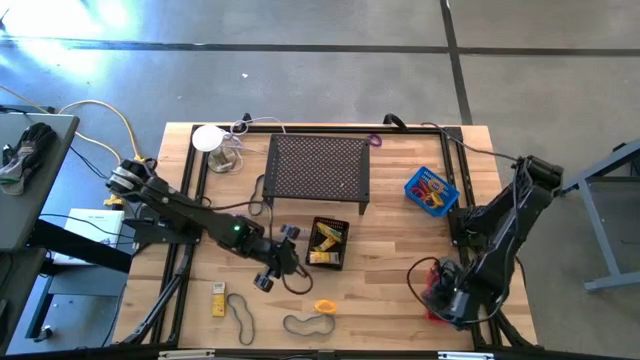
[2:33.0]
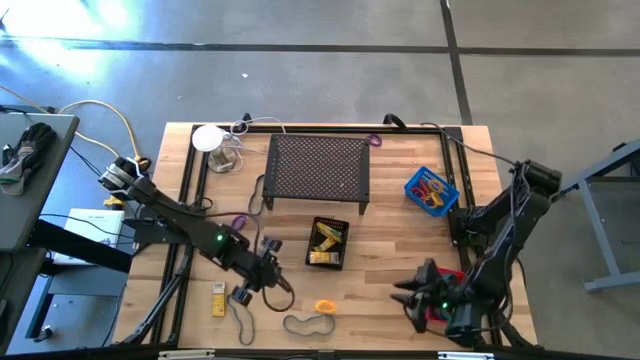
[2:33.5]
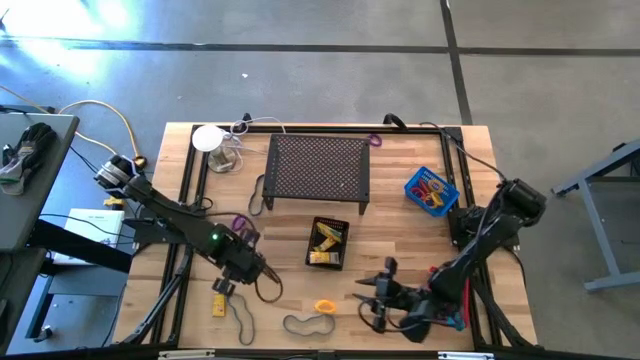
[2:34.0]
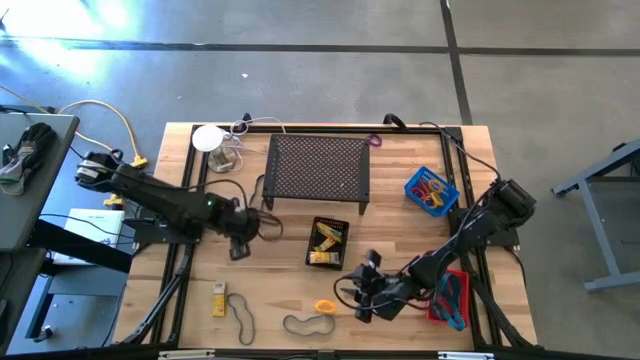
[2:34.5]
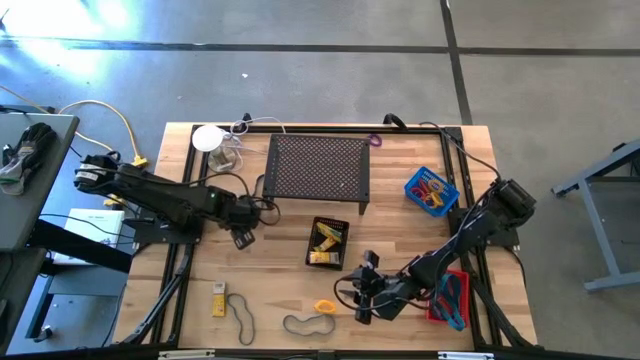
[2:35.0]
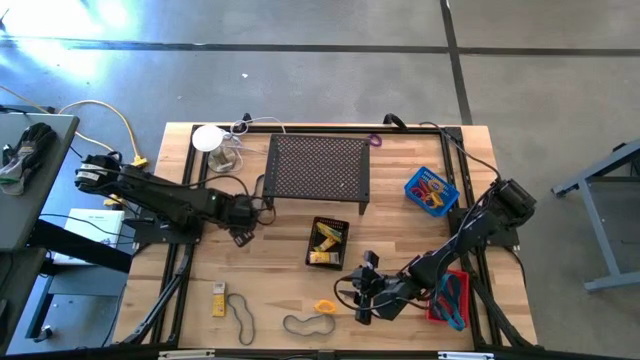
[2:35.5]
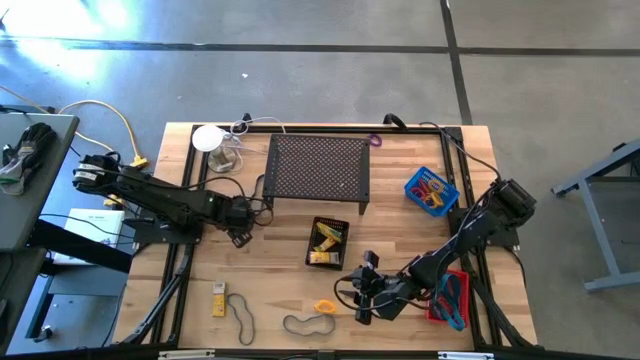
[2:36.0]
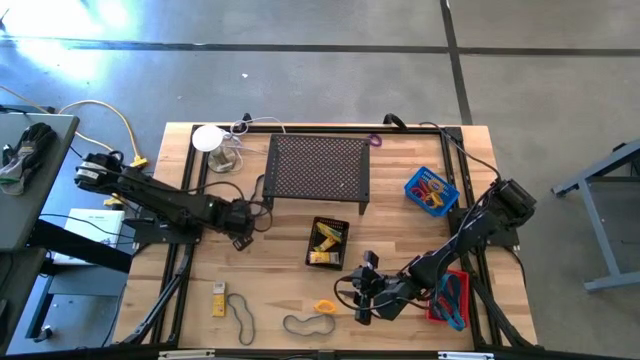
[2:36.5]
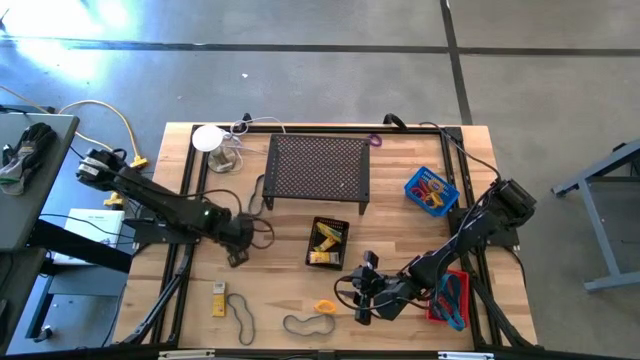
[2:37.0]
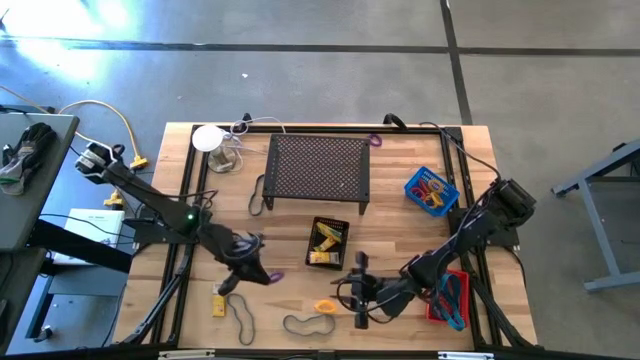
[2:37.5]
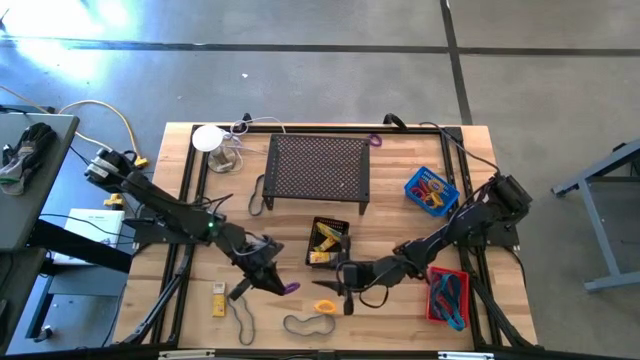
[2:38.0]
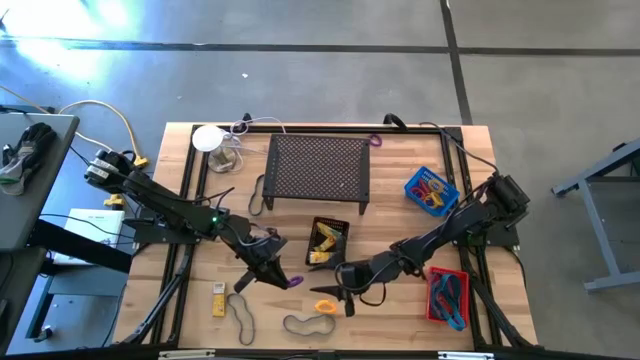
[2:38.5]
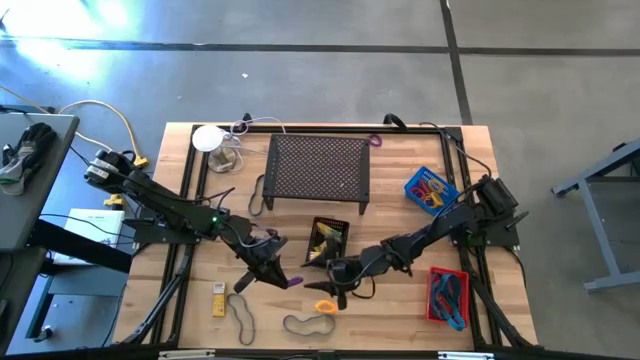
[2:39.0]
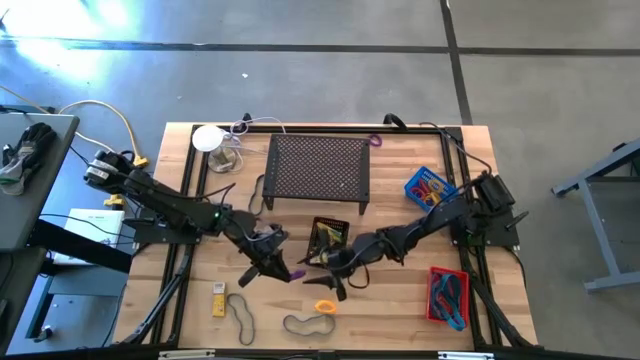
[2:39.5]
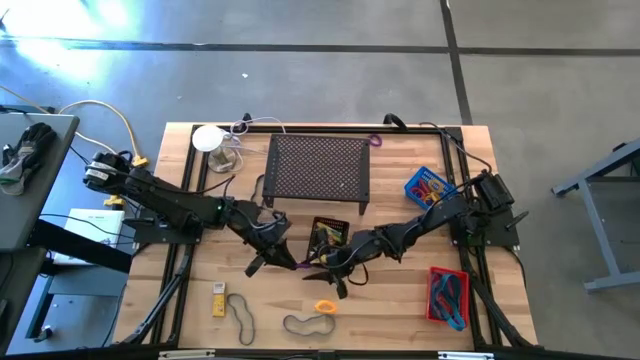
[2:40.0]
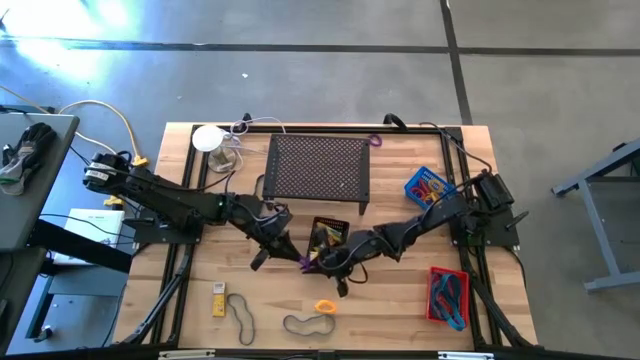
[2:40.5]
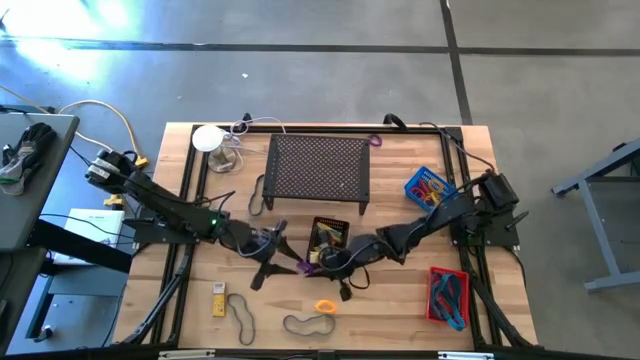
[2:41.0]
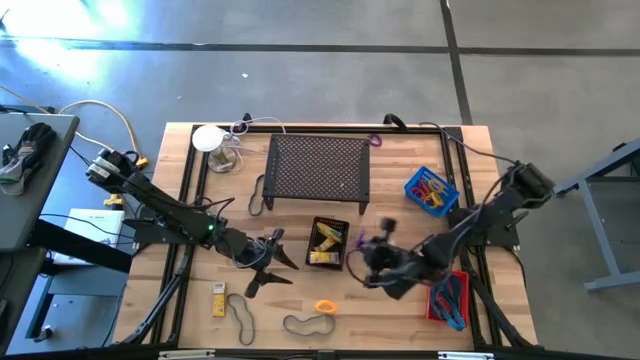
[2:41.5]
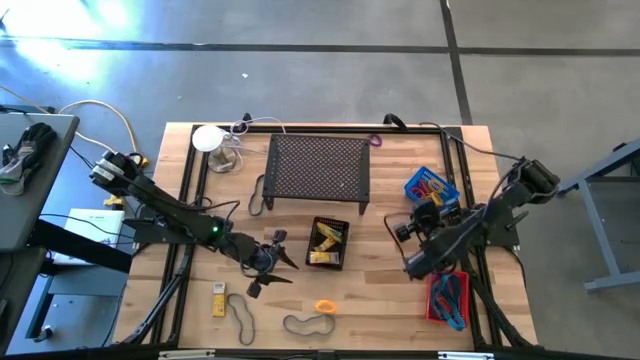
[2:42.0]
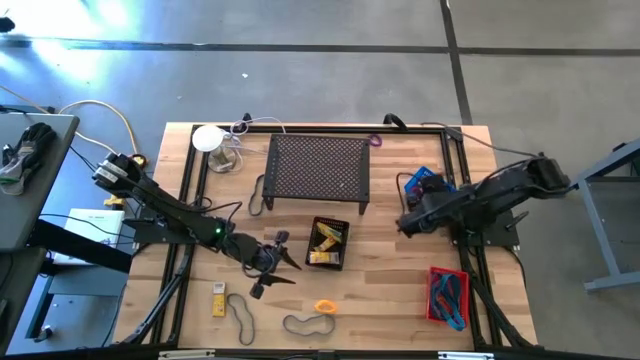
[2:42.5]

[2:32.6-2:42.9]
Task: Pick & Place Office Desk Supplies
Put the purple spring keychain into the blue bin

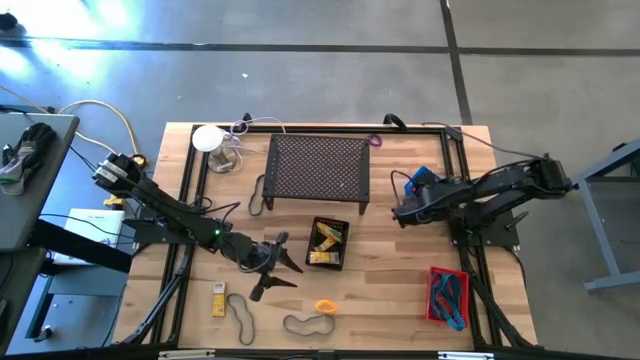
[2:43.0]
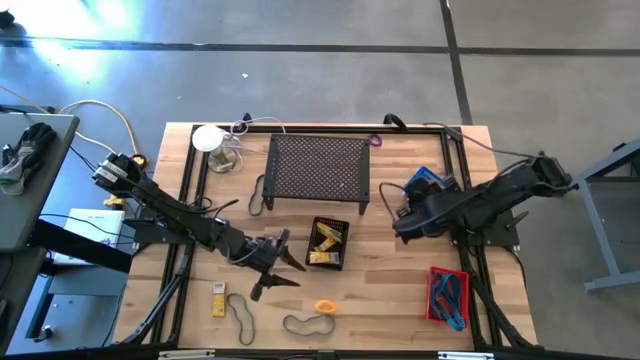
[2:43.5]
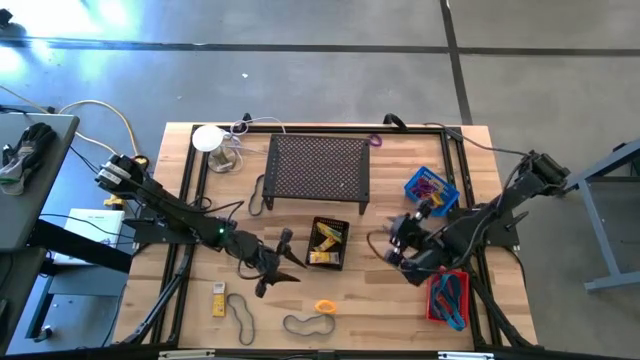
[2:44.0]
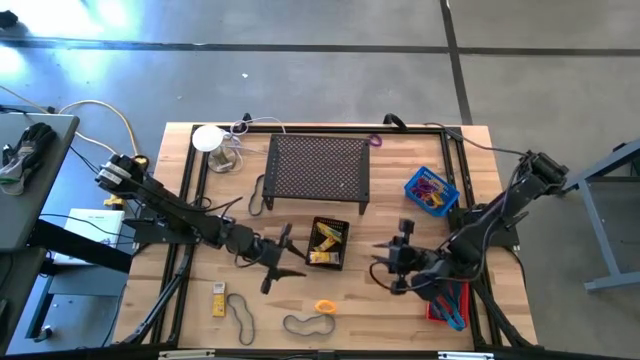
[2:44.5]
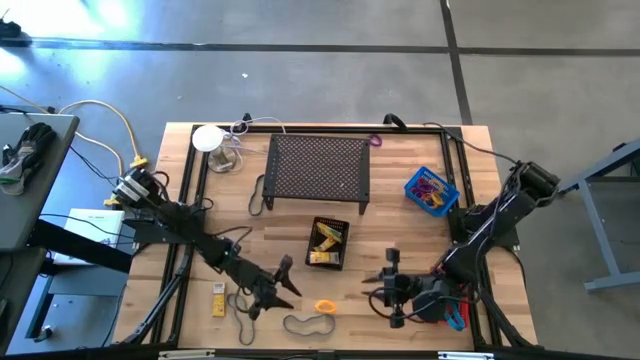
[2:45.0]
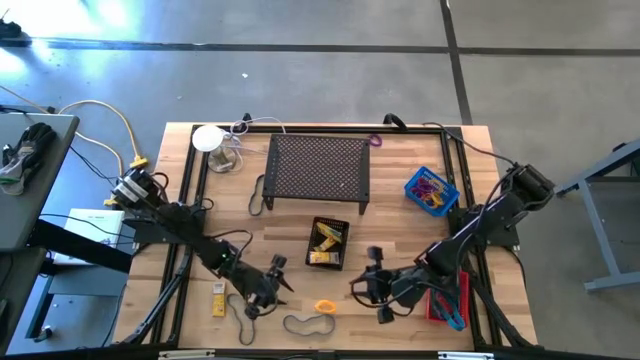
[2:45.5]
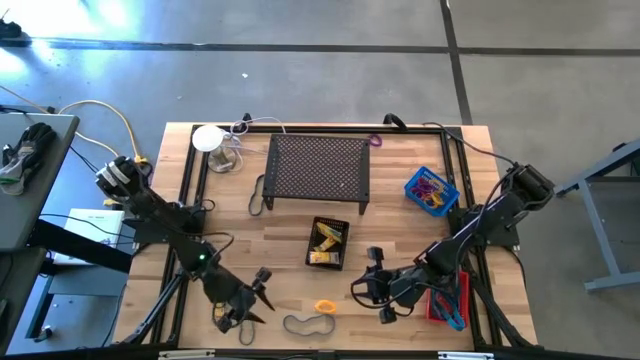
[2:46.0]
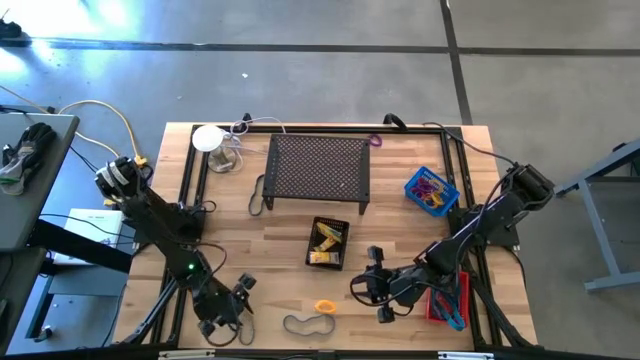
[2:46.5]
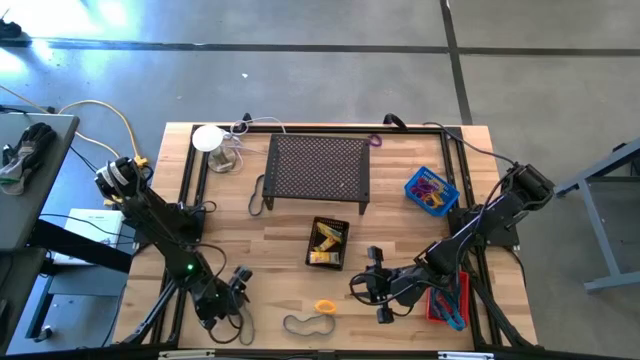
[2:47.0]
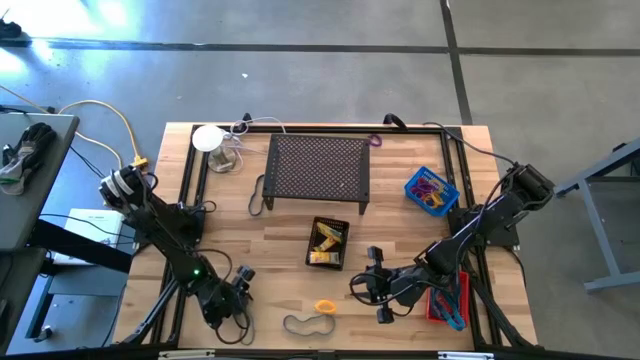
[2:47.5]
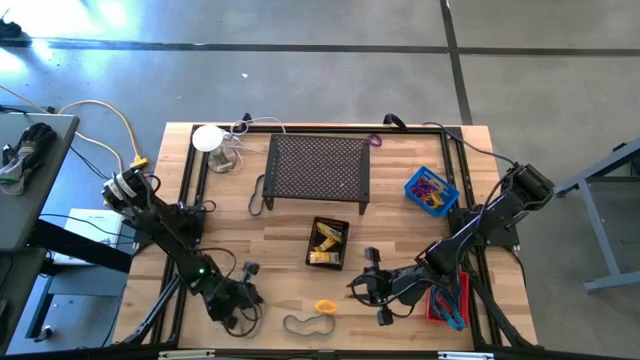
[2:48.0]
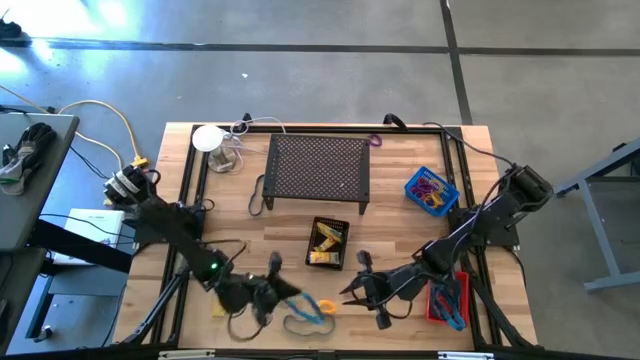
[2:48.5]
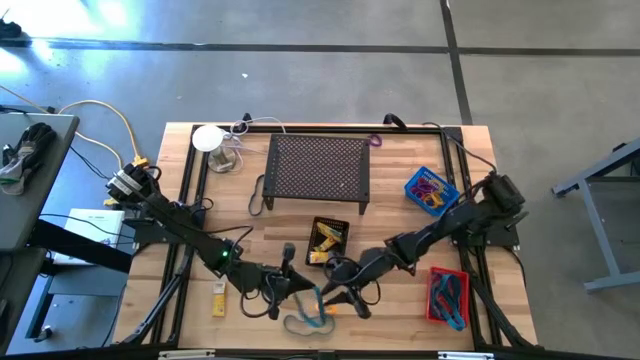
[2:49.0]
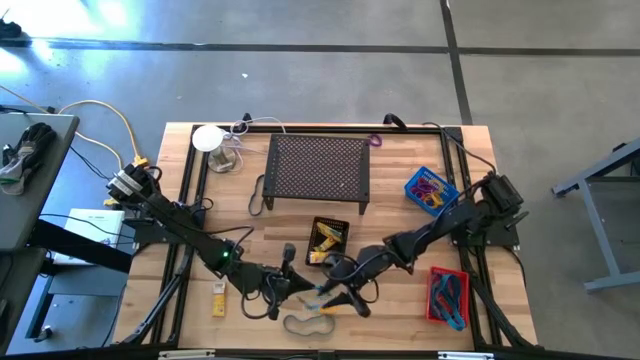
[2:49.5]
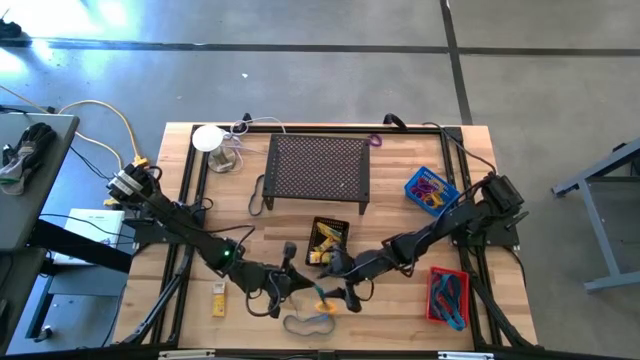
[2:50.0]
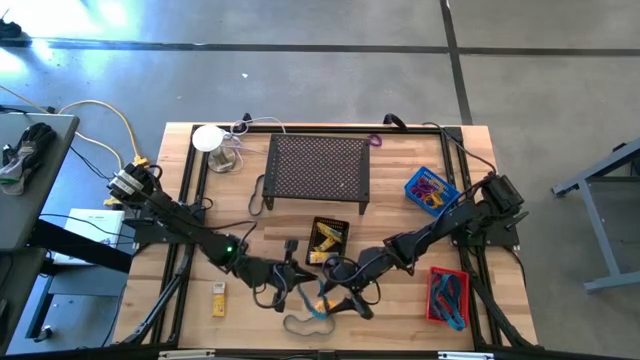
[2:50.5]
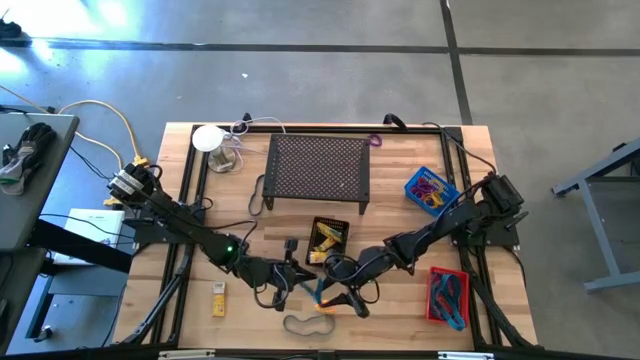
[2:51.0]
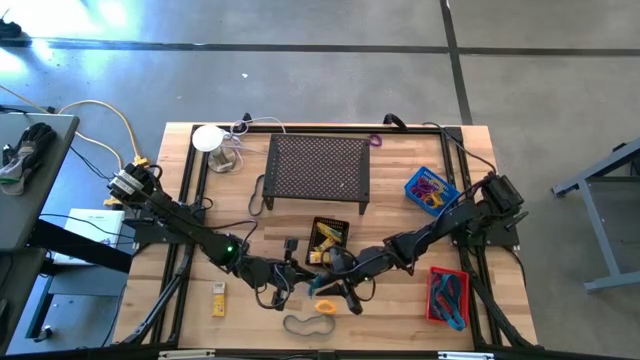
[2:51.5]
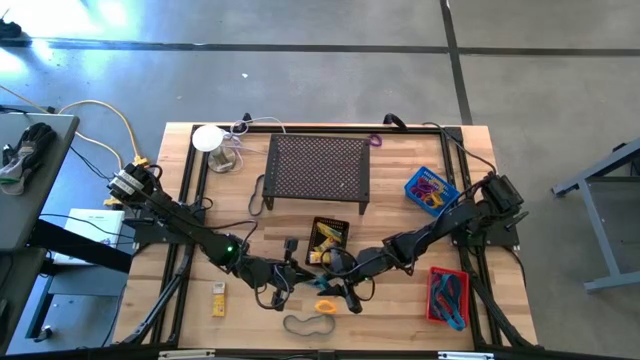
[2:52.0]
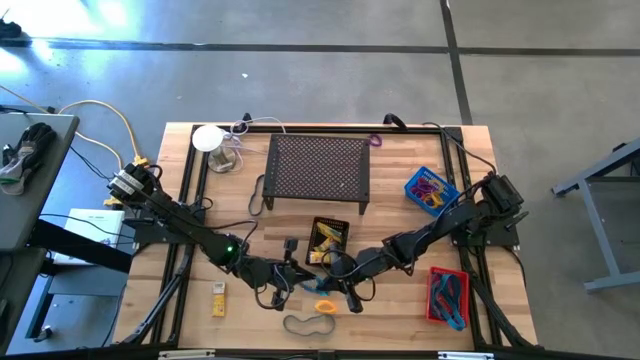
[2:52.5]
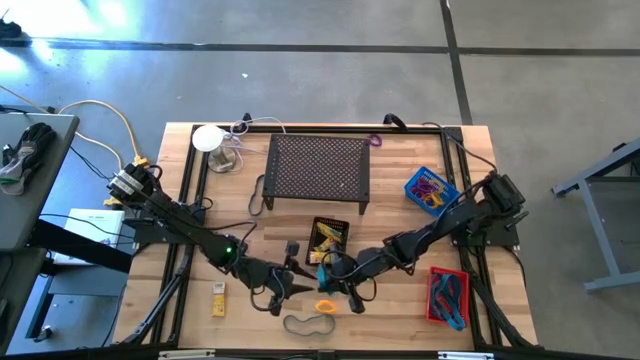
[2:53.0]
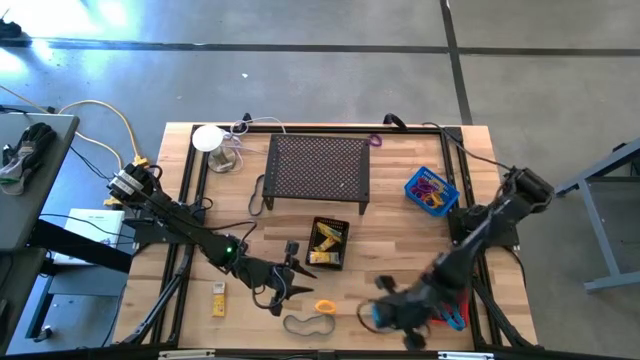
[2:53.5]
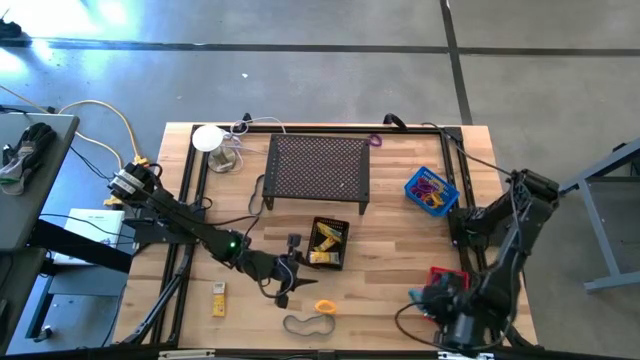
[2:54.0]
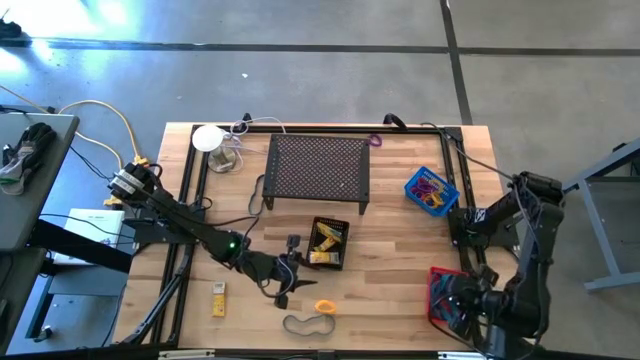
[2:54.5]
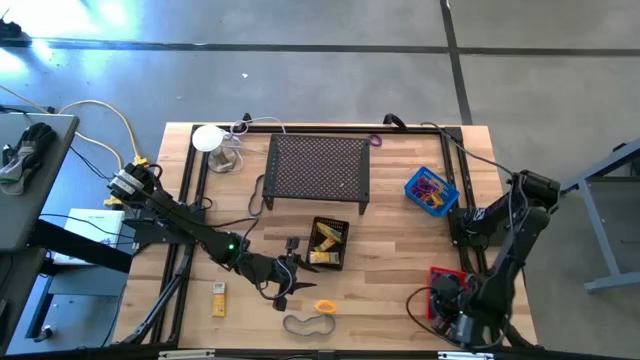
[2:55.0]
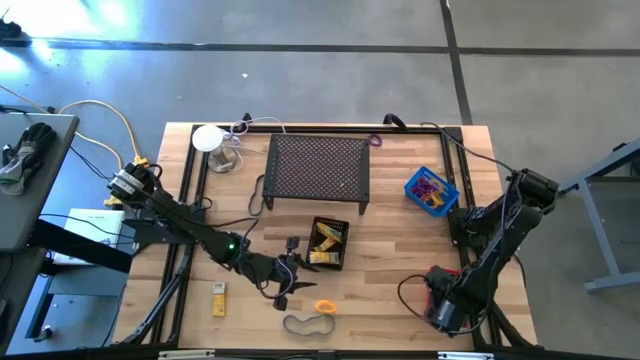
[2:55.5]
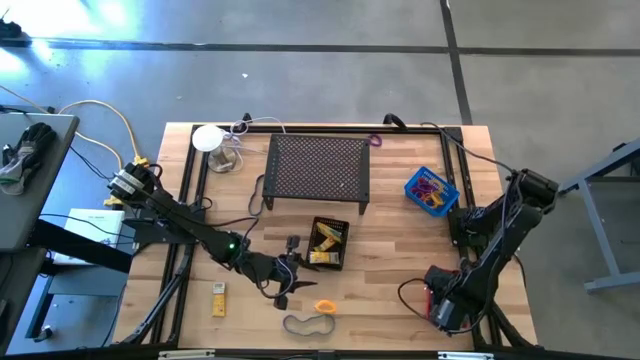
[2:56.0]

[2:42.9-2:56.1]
Put the blue rubber band into the orange bin
